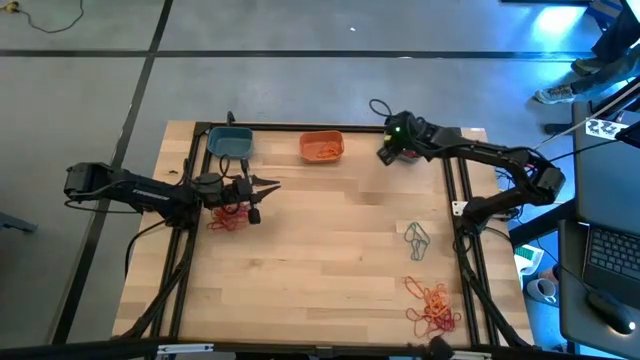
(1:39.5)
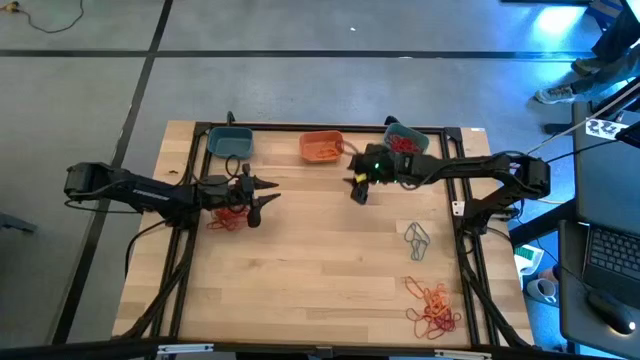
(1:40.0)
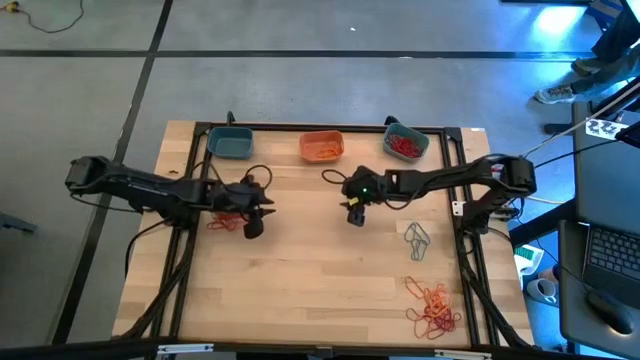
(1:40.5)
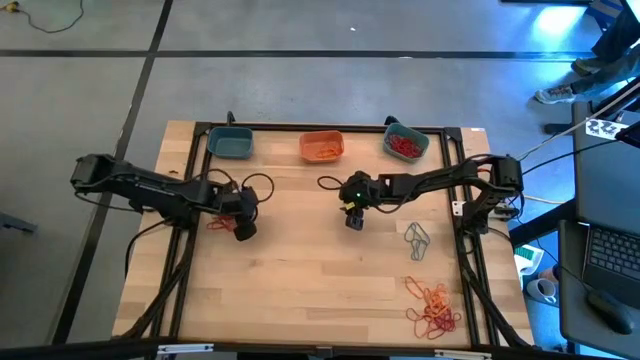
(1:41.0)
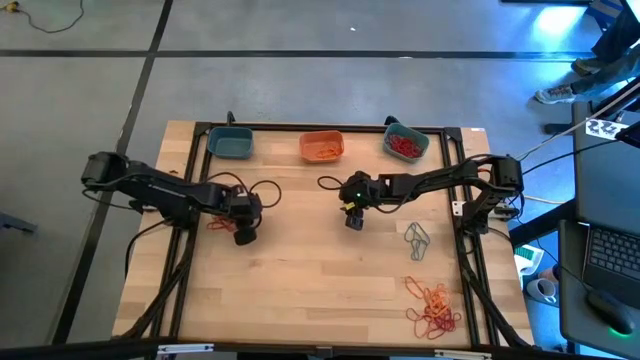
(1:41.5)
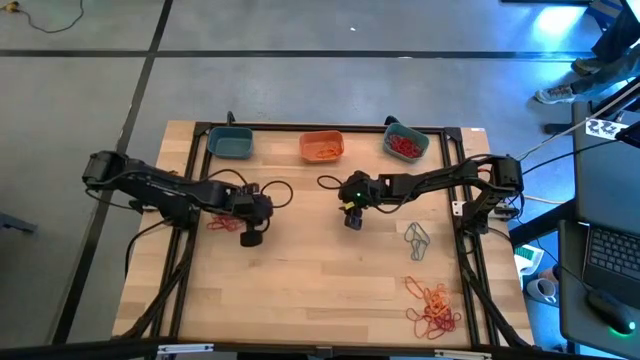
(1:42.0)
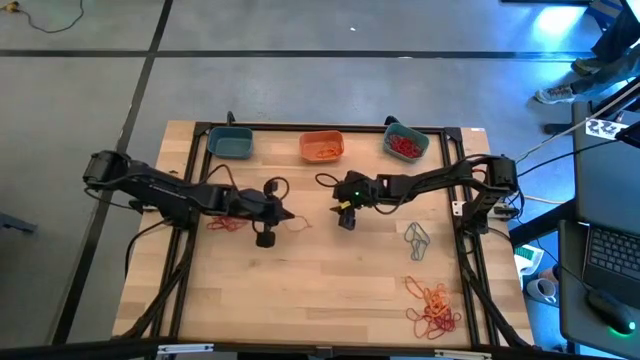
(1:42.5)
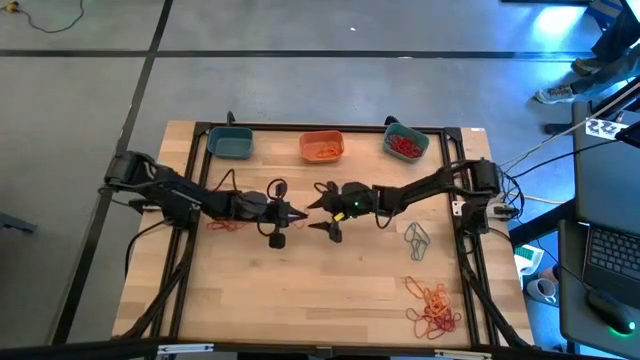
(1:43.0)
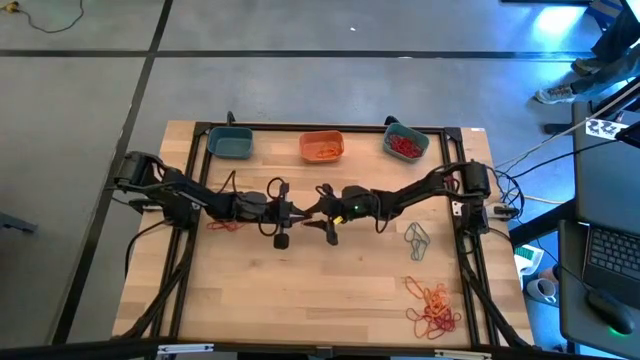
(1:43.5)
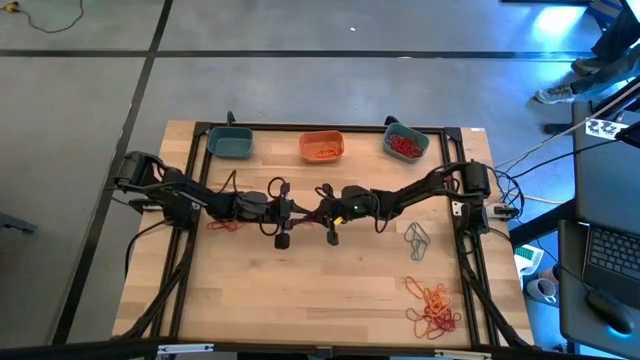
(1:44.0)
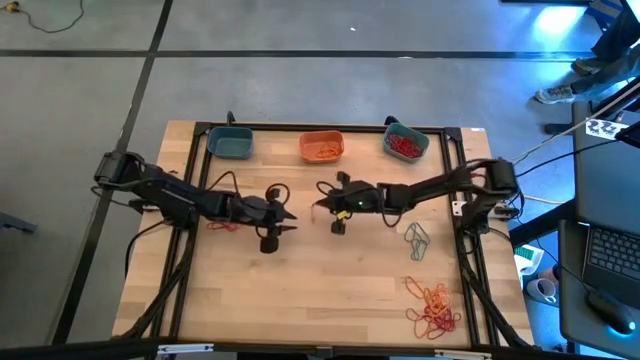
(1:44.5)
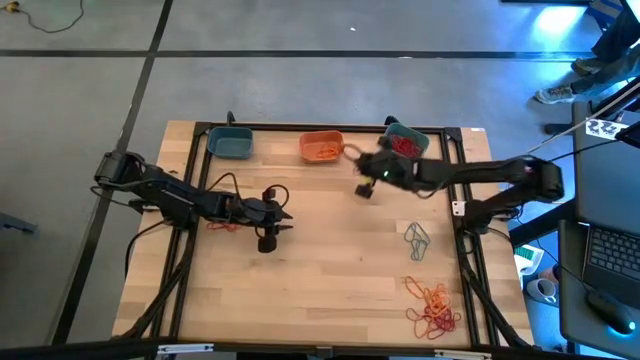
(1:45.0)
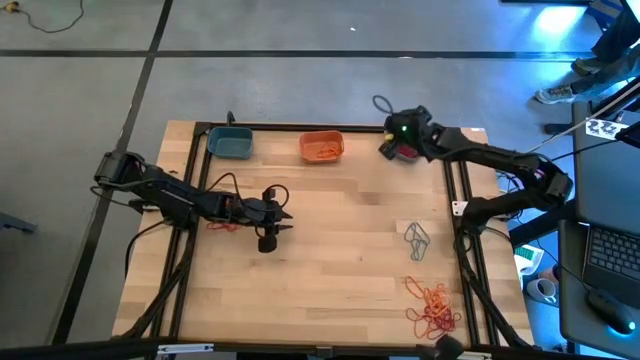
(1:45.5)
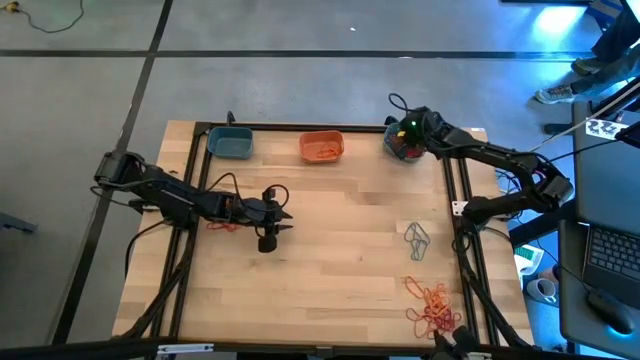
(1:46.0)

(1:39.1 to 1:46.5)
Task: Sort rubber bands into baskets
Put the red rubber band into the green bin

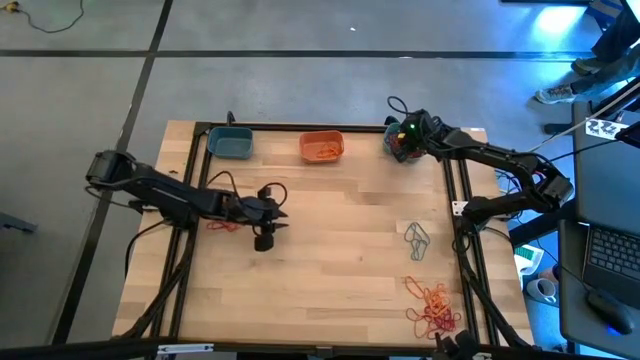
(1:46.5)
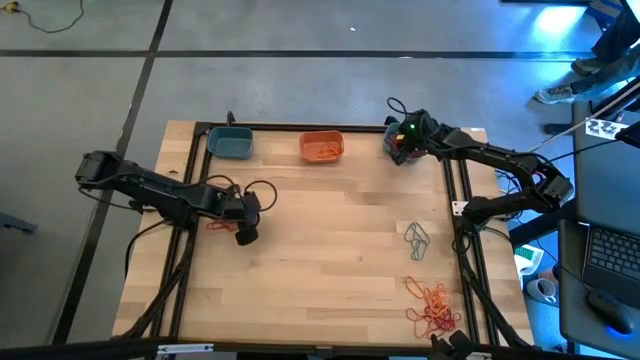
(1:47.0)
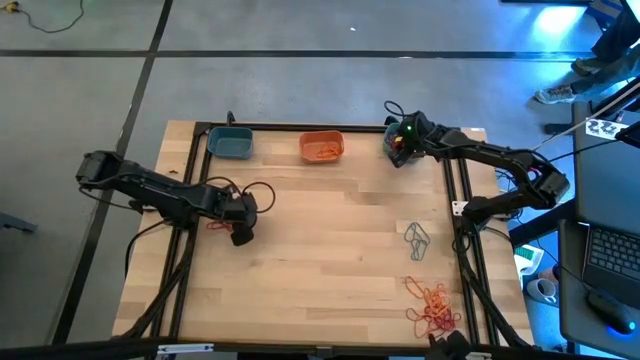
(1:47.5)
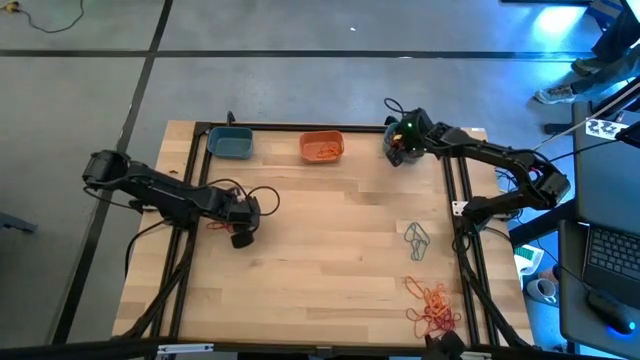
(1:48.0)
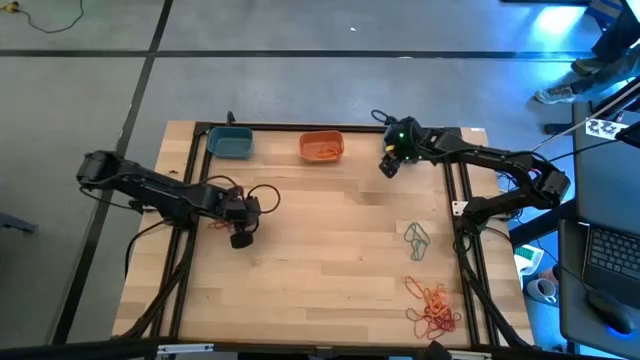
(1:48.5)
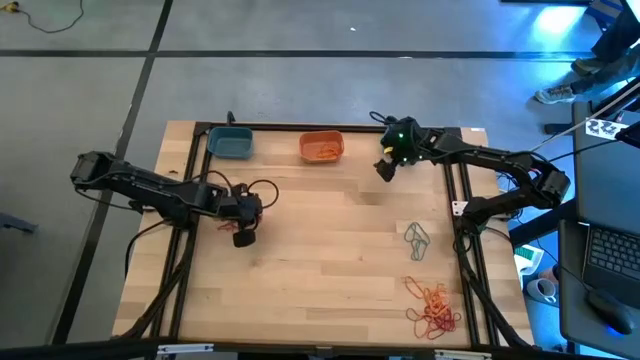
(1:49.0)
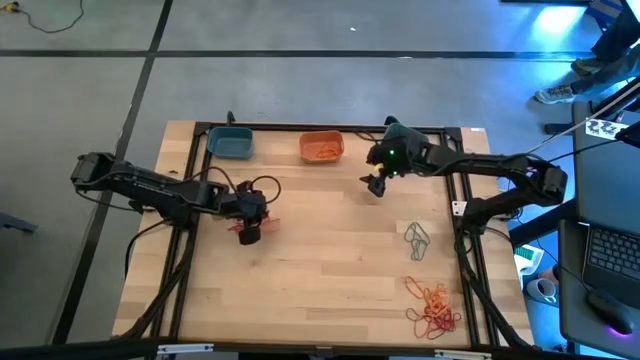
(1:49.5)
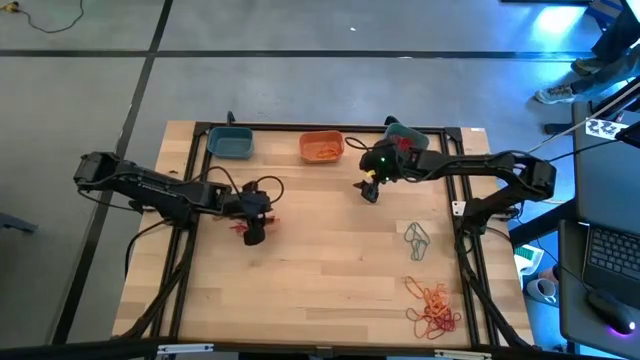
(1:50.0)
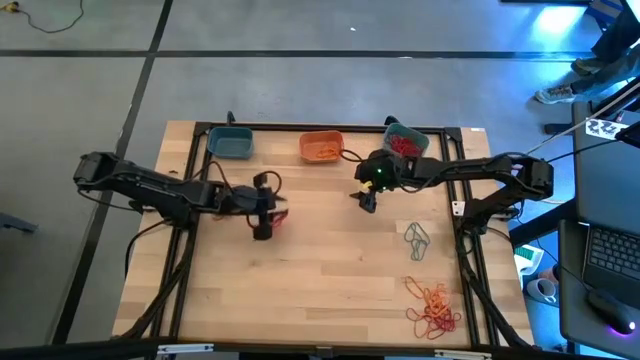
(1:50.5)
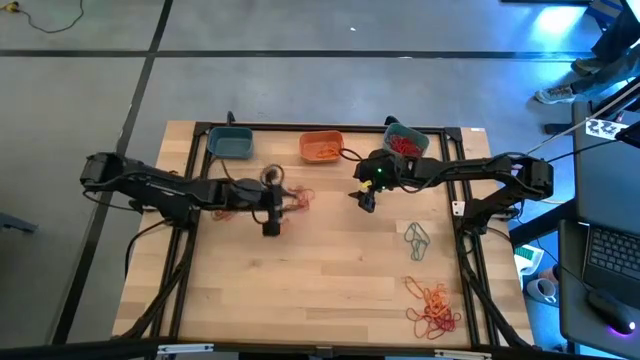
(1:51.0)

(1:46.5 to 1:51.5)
Put the red rubber band into the green bin

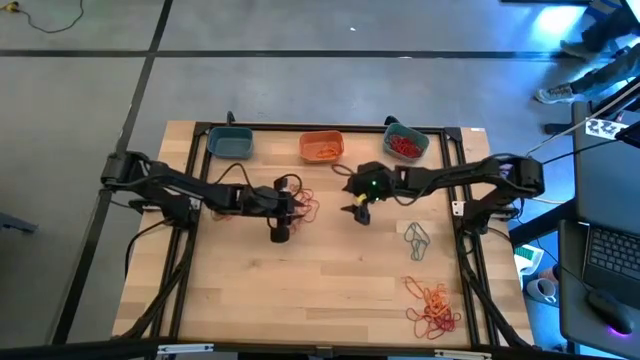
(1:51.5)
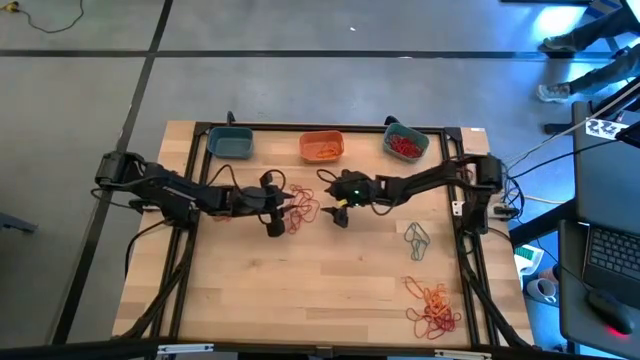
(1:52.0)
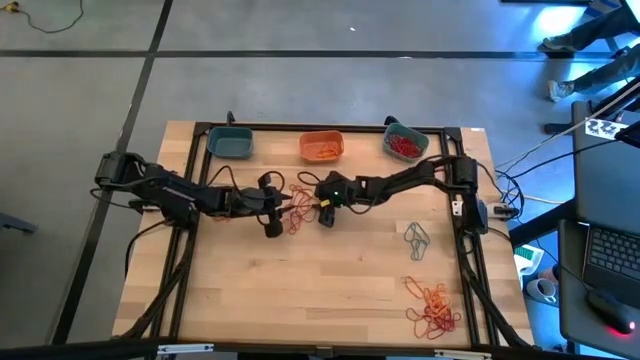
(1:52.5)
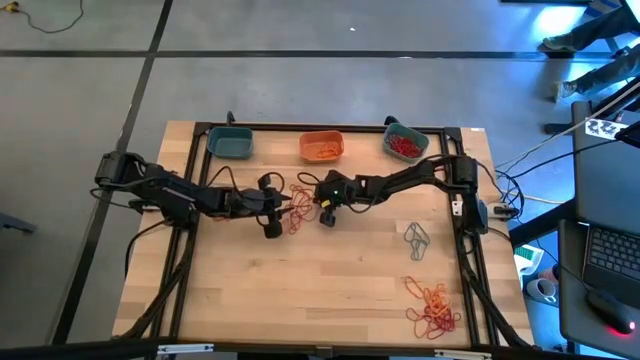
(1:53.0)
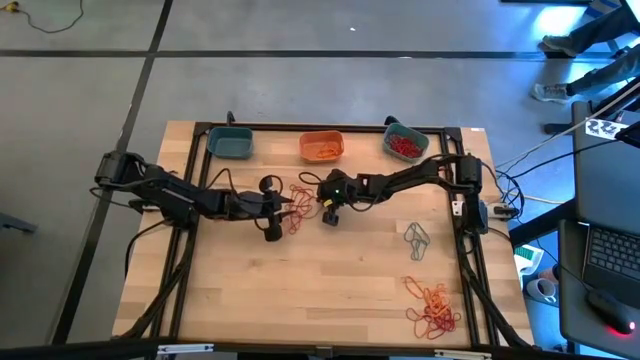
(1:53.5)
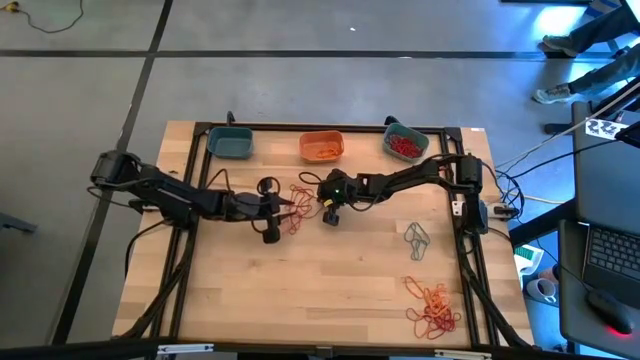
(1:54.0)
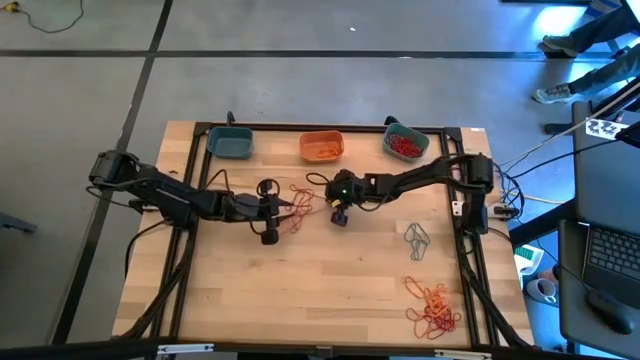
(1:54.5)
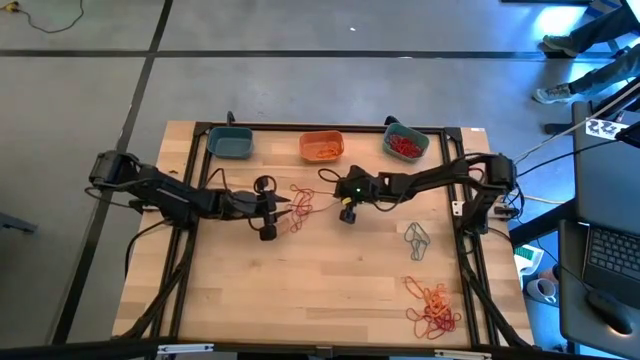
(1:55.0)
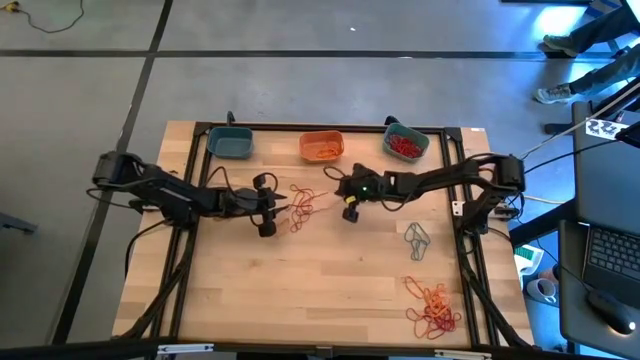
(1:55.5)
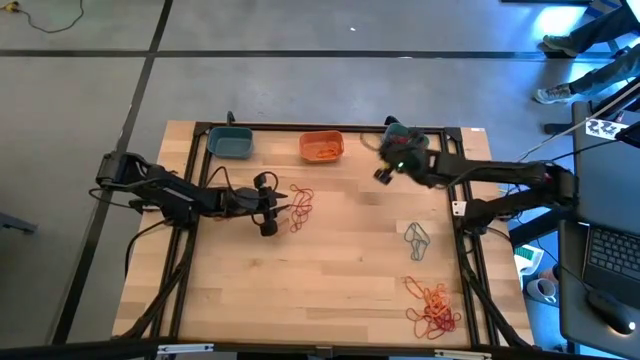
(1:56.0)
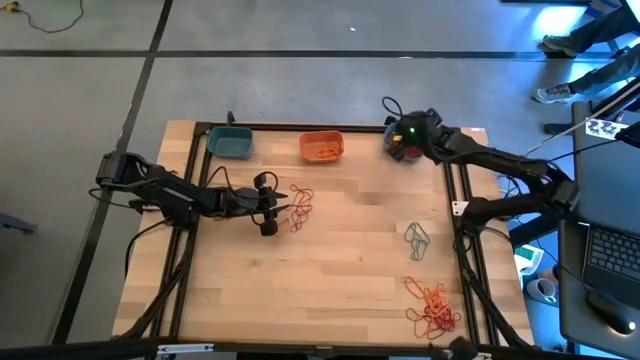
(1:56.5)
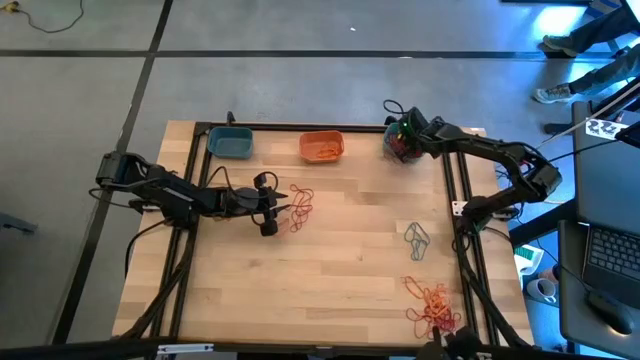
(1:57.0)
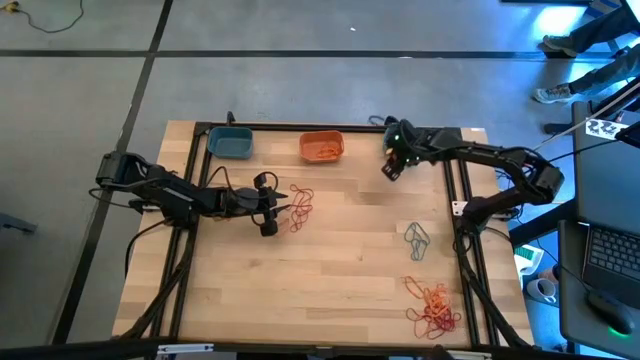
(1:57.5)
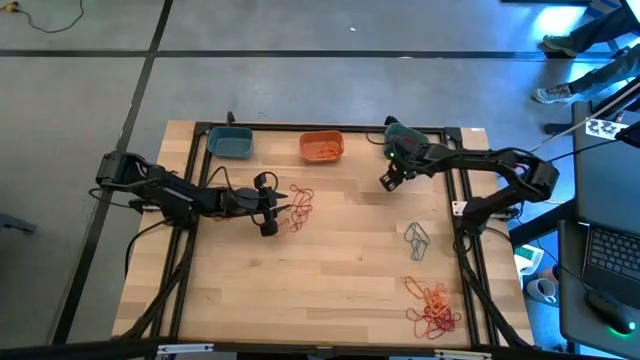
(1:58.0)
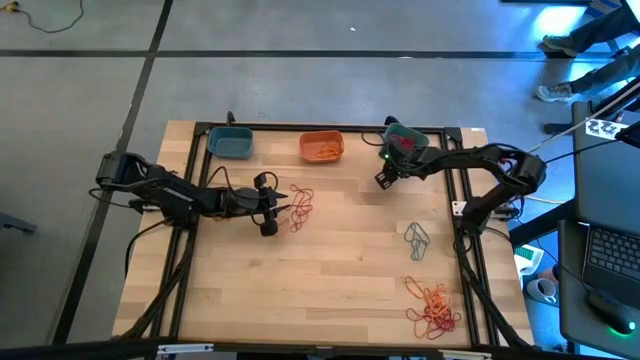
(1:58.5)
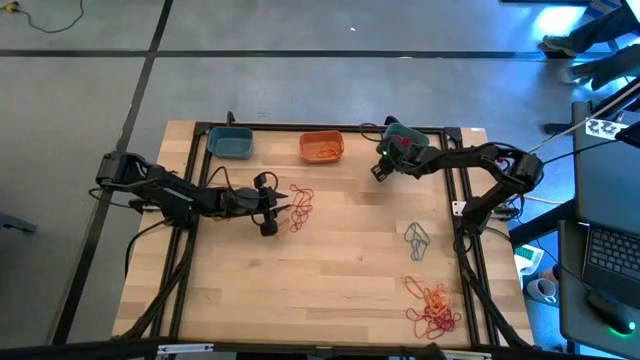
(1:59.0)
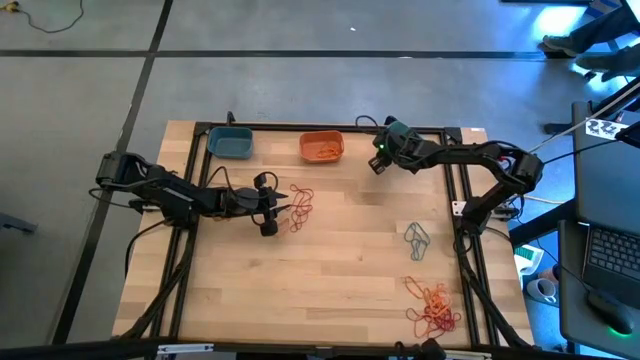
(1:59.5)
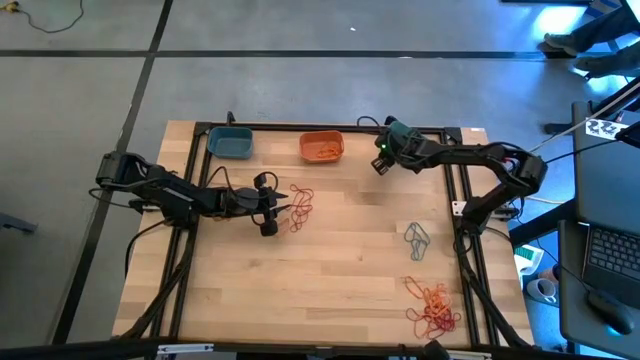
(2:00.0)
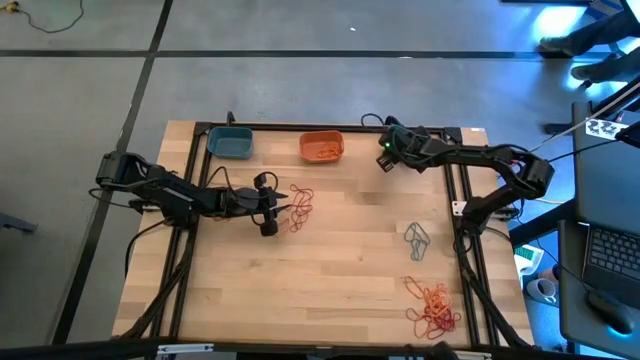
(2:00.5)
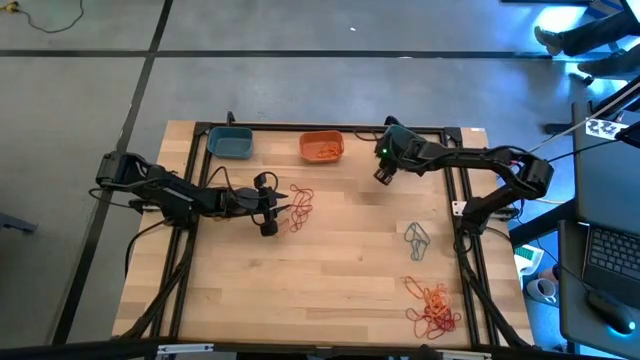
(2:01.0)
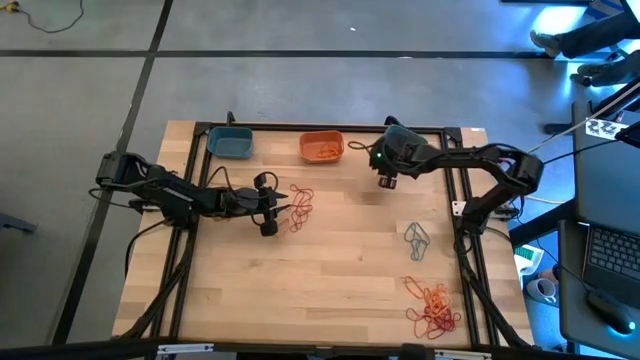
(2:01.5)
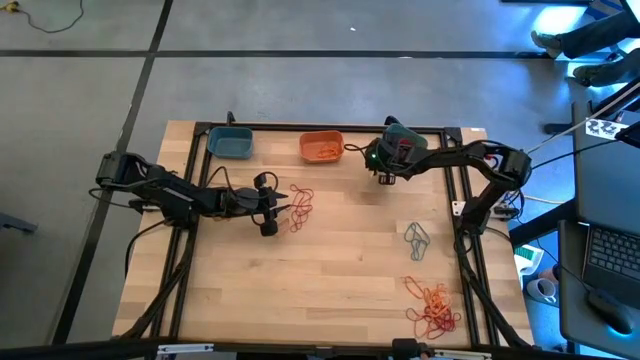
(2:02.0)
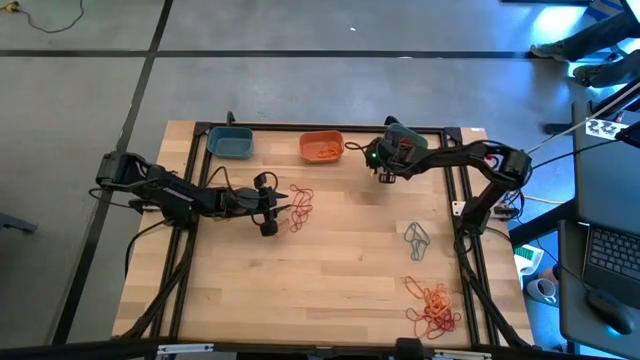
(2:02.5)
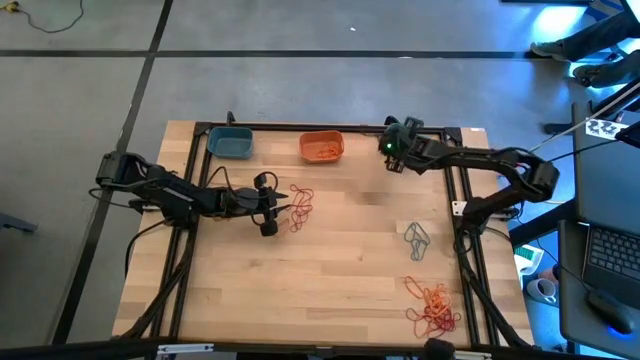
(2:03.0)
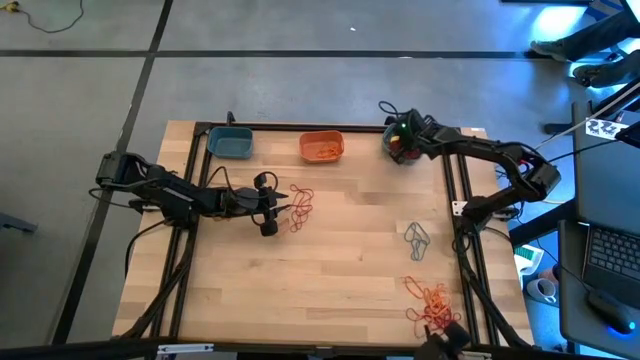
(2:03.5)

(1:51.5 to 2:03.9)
Put the red rubber band into the green bin
